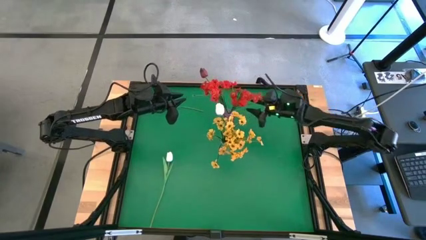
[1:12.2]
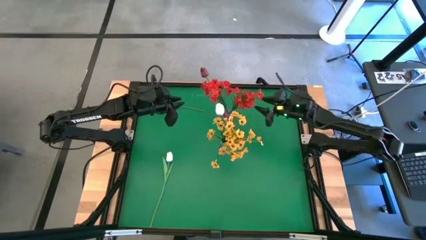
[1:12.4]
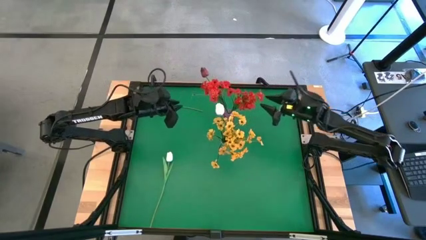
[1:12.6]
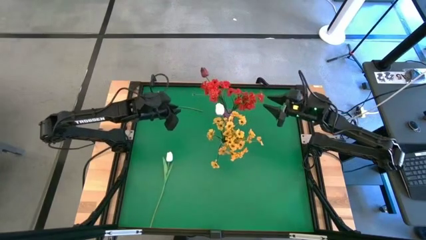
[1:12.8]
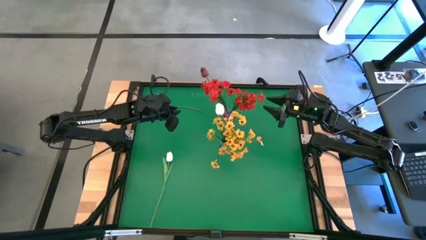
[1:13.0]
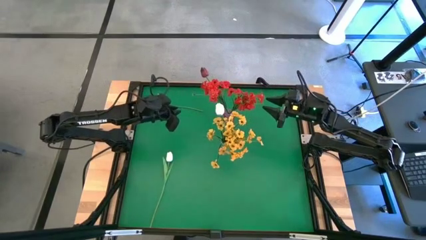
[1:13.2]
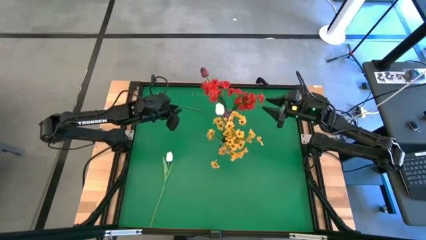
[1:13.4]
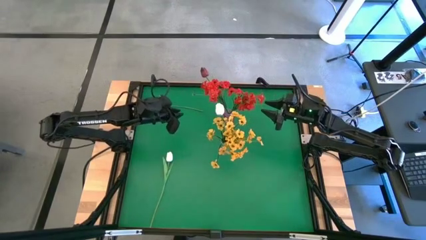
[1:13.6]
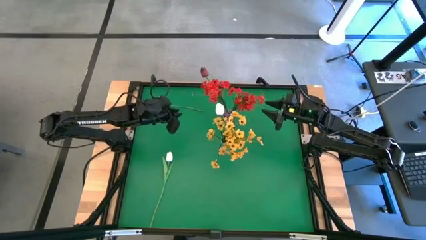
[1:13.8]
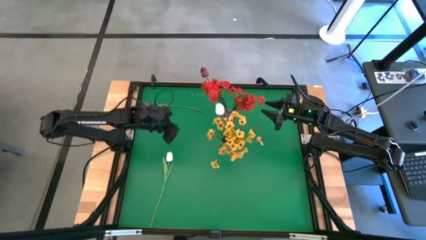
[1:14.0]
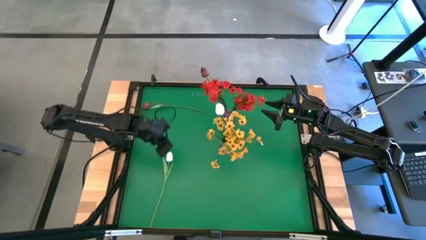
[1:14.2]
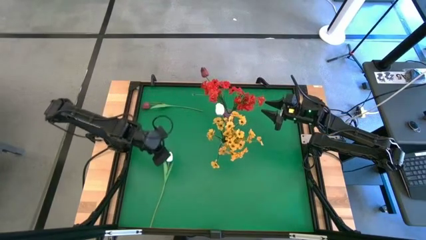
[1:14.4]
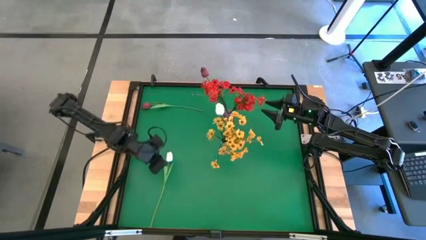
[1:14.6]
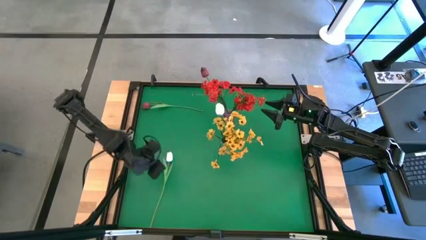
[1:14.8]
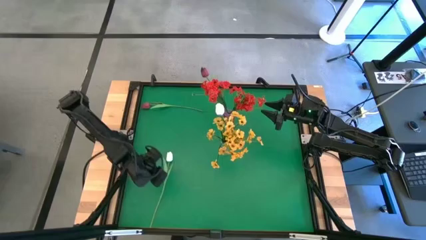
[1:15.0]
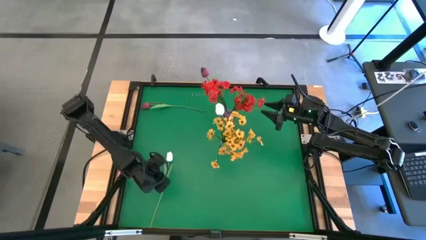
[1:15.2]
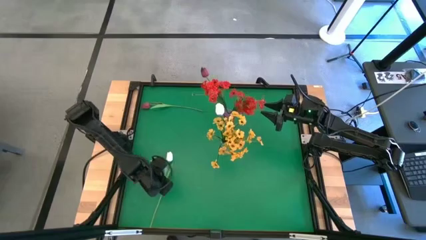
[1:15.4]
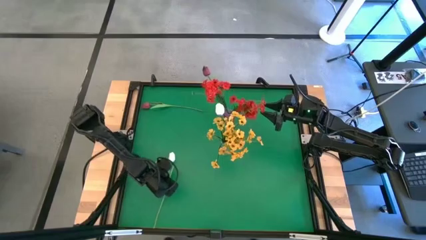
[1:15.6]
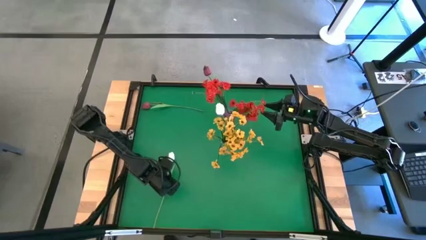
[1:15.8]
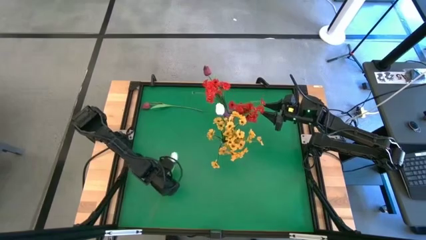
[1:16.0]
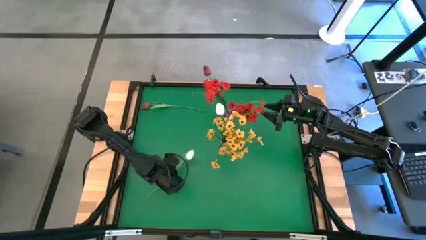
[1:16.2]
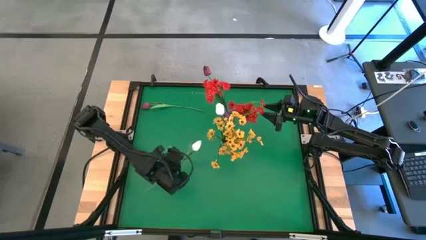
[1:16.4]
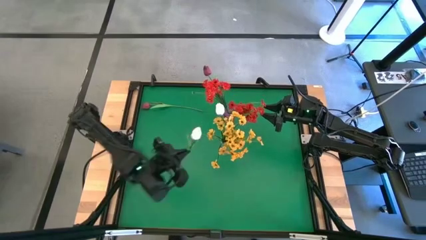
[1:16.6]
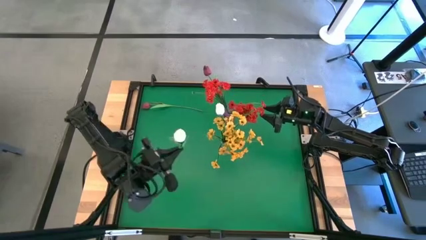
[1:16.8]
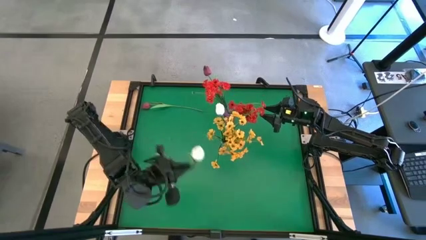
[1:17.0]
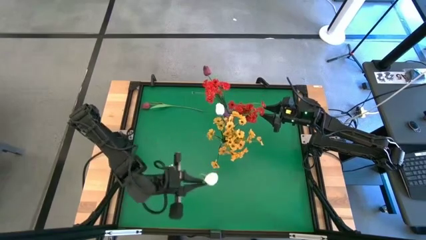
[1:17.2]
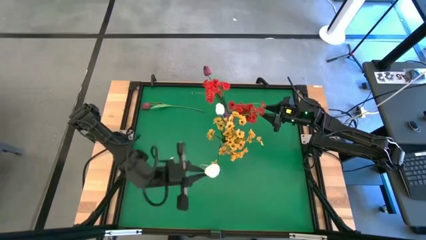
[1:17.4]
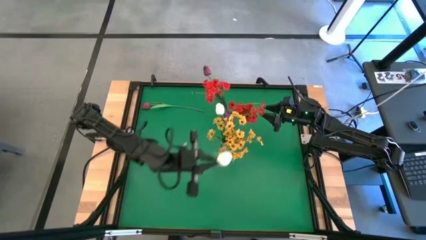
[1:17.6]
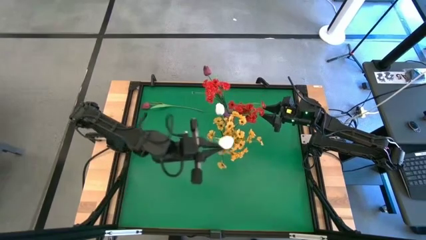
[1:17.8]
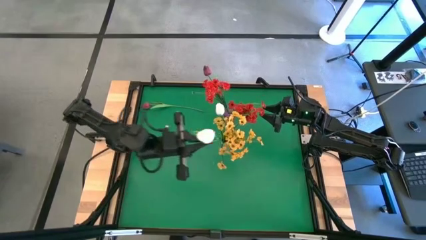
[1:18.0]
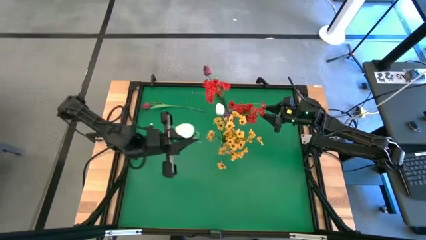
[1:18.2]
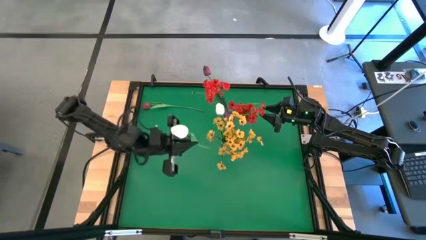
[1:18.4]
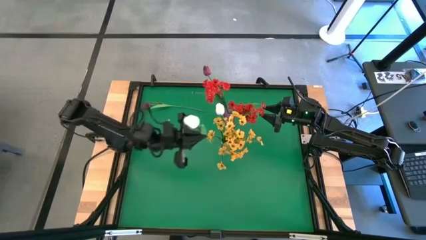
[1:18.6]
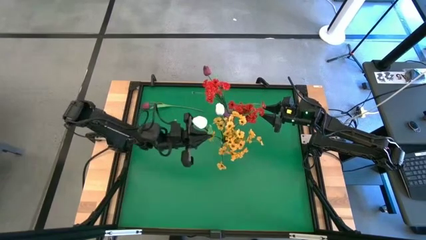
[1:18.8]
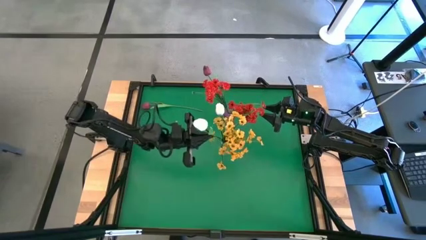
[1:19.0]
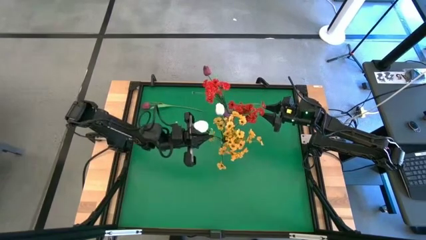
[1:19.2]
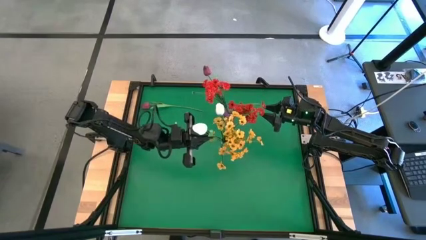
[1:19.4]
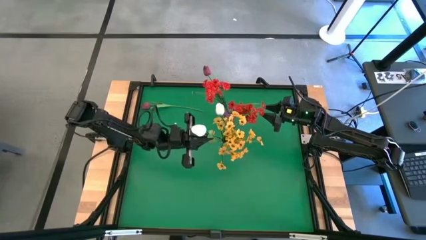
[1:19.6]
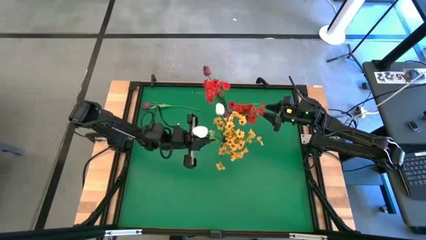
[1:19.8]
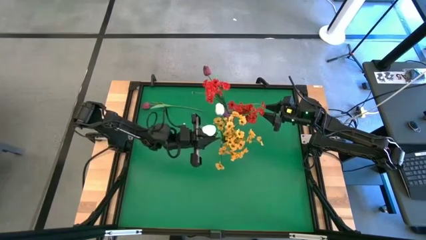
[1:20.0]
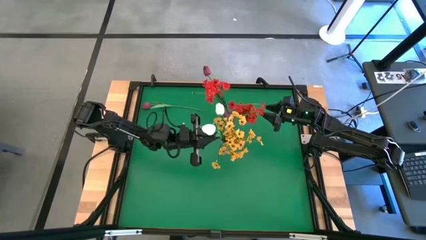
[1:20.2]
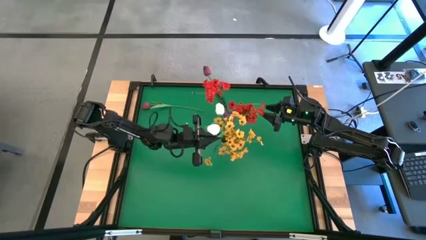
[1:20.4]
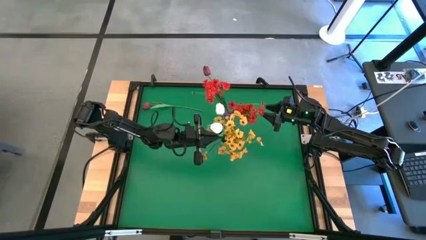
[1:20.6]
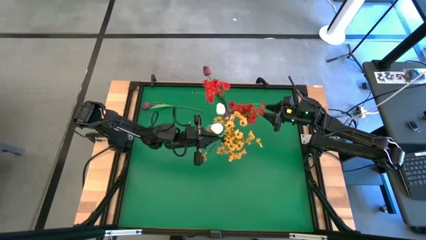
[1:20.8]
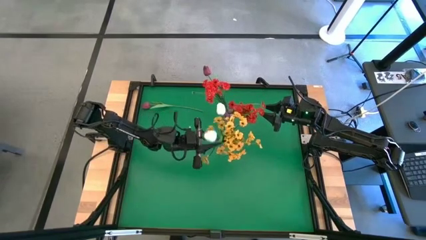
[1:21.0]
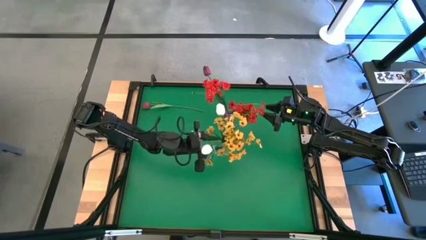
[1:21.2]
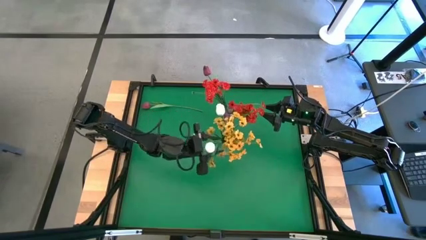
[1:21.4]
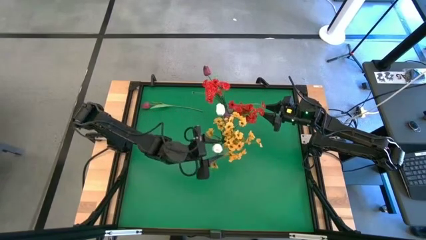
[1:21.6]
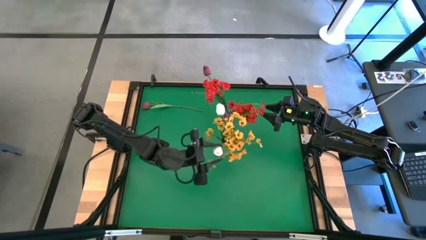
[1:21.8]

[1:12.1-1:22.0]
Task: Sort flowers into vase by color
Put the white tulip into the transparent vase

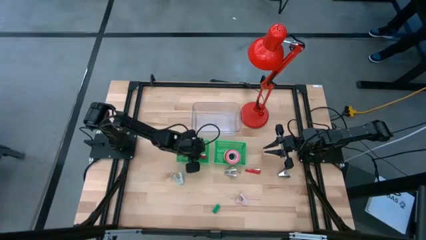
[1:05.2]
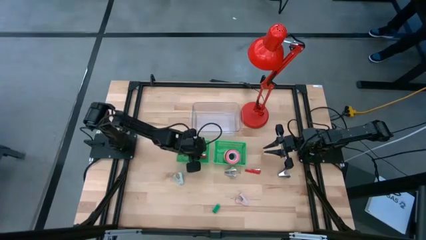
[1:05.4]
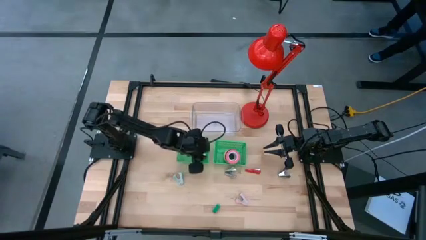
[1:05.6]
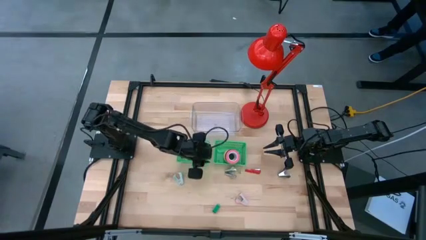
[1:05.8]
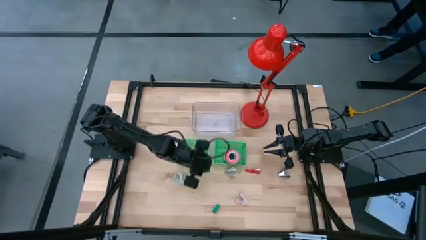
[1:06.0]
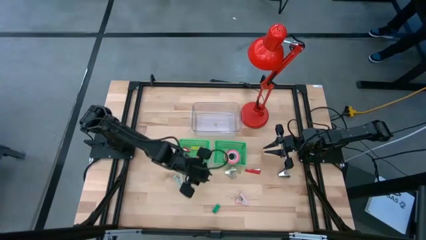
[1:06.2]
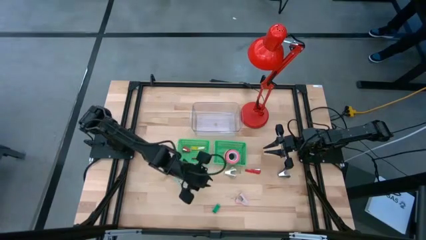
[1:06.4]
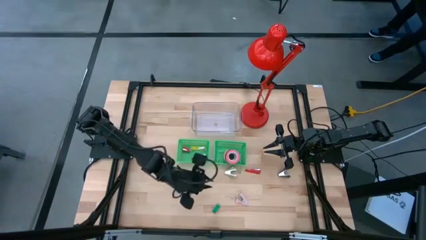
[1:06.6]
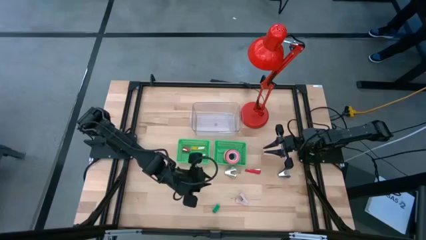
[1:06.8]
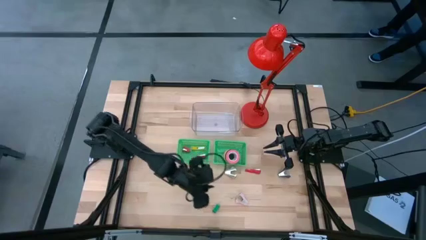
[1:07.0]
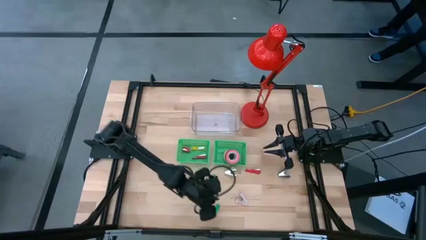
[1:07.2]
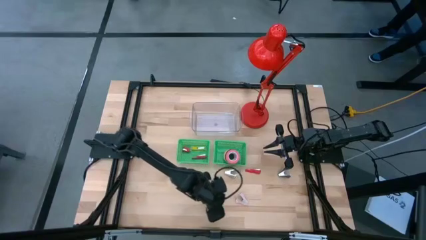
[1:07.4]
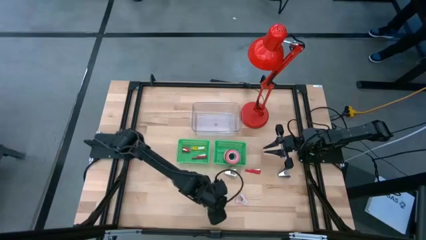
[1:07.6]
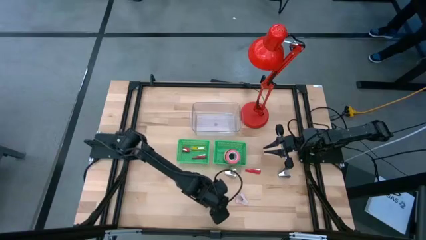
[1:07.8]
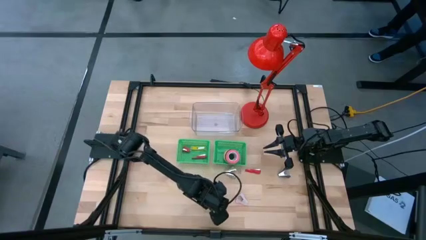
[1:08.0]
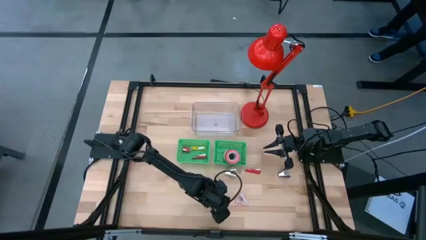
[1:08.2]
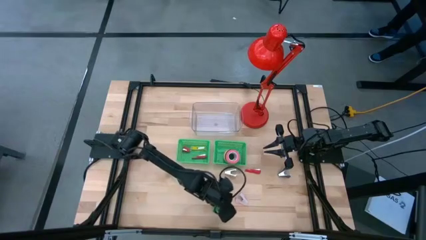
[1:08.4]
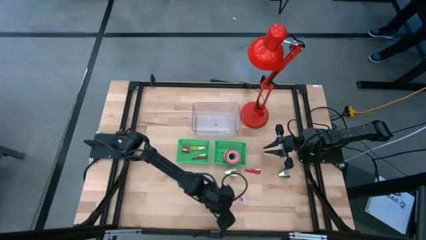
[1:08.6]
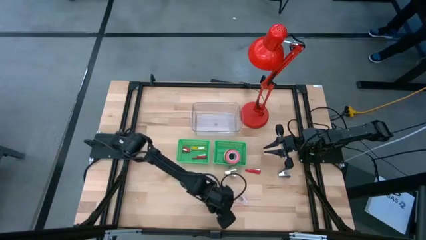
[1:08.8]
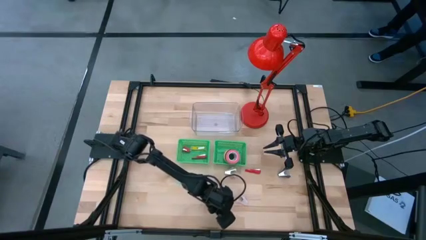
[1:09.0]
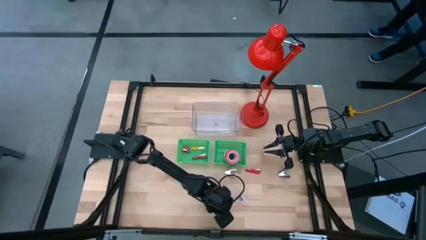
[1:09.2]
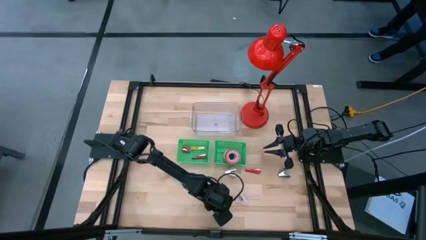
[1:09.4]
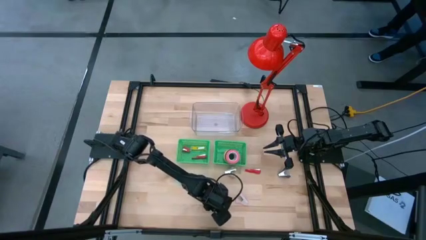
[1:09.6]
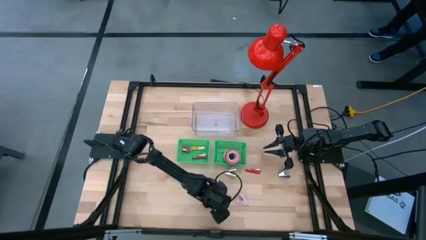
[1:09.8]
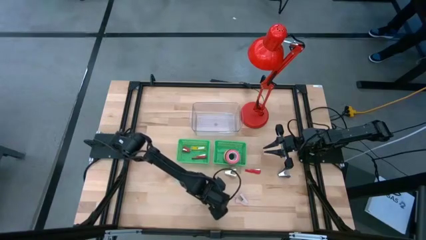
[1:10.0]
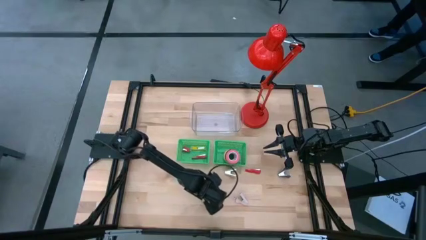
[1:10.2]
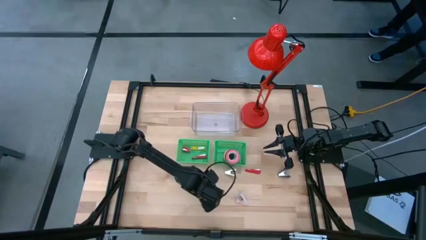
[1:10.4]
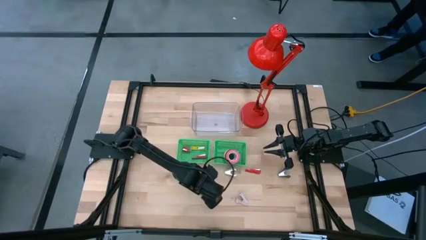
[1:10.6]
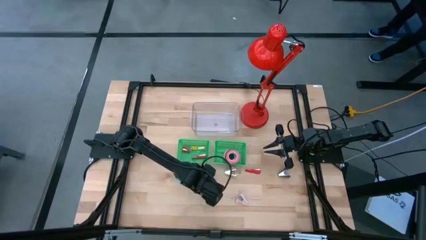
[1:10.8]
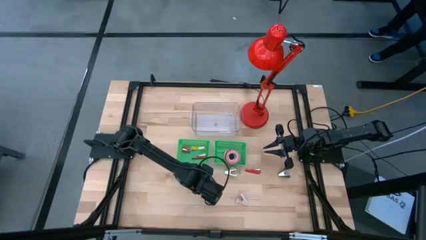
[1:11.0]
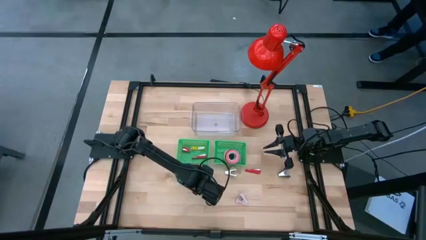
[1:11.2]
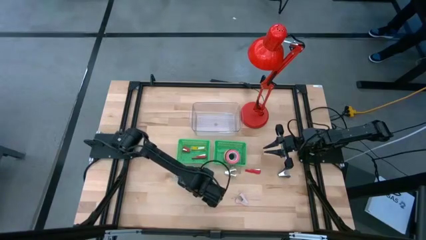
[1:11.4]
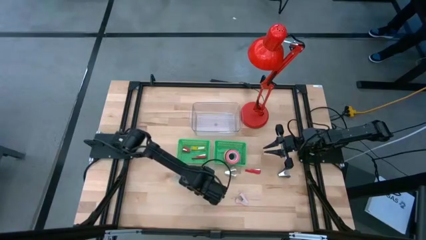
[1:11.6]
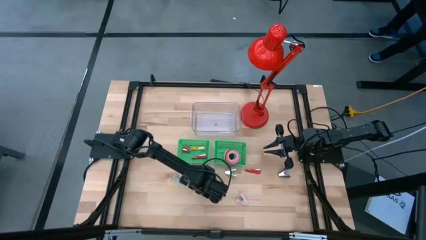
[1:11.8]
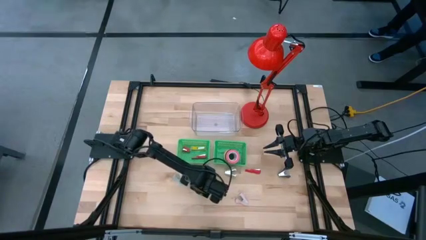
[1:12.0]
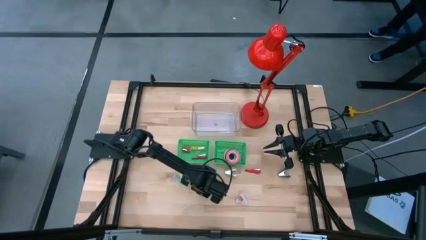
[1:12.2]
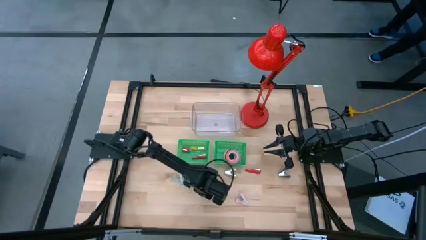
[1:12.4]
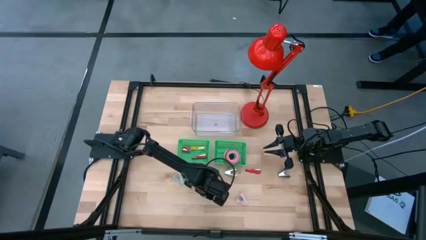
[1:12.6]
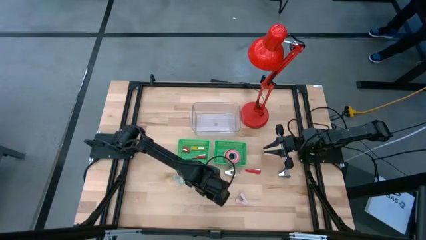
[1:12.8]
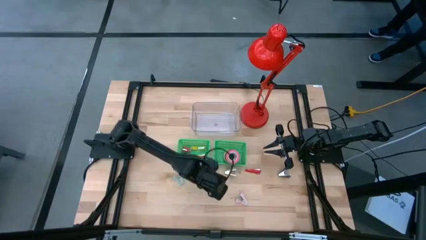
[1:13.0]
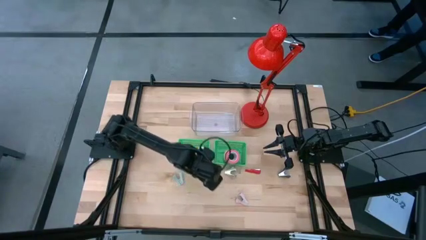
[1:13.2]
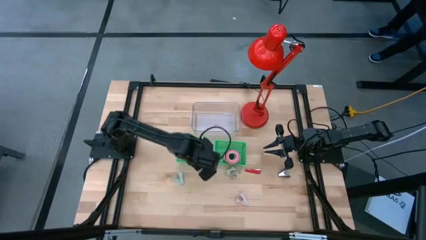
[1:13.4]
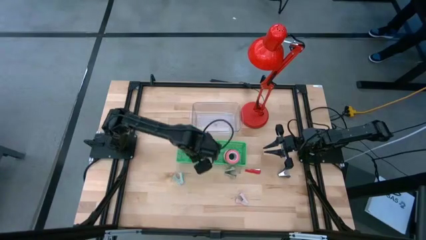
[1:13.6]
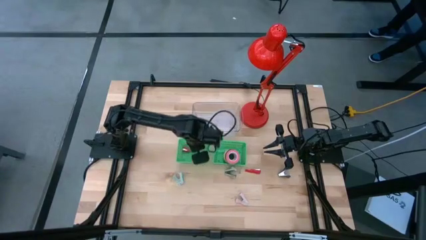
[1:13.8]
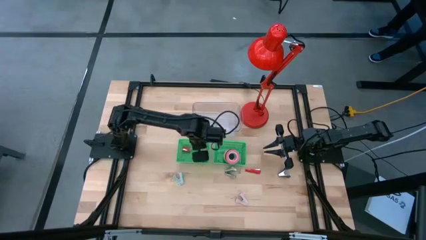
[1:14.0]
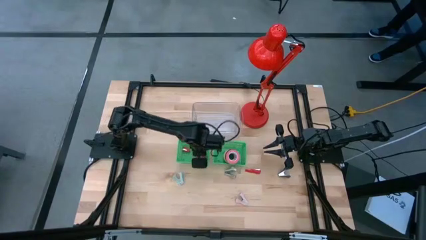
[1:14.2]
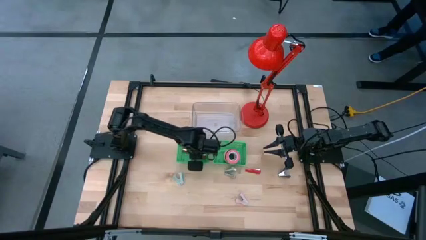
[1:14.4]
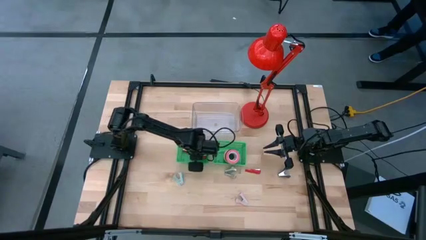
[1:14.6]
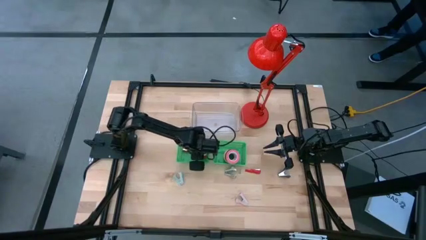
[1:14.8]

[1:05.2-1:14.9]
Task: Pick and place Stapler, Stapler remover, tape
Put the green stapler into the left green bin
